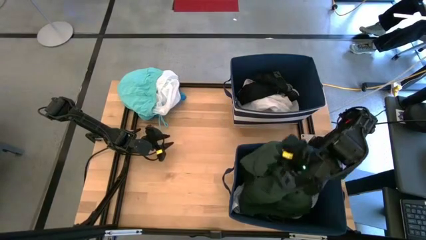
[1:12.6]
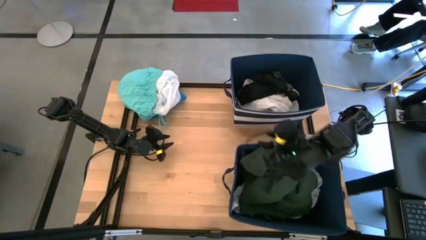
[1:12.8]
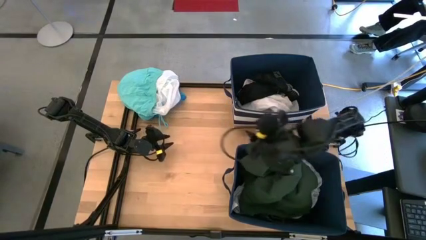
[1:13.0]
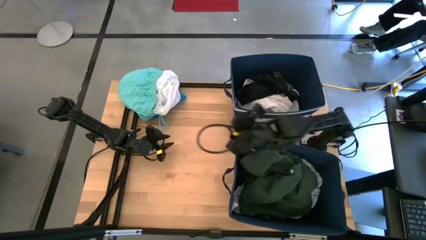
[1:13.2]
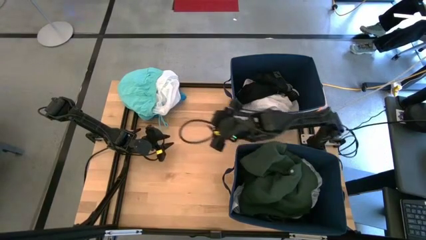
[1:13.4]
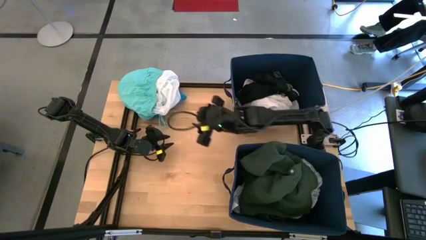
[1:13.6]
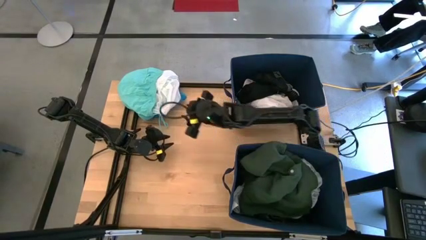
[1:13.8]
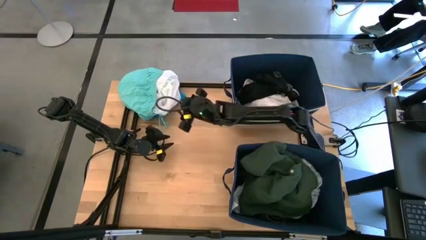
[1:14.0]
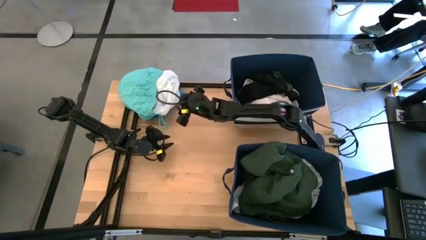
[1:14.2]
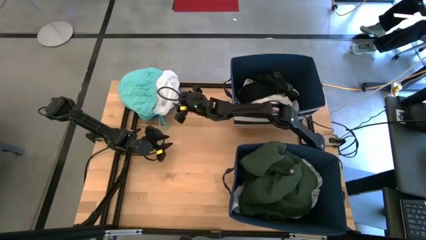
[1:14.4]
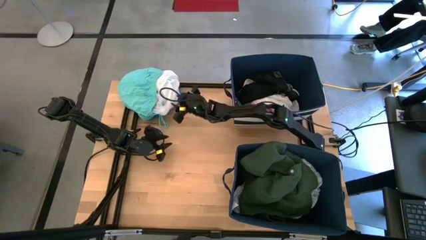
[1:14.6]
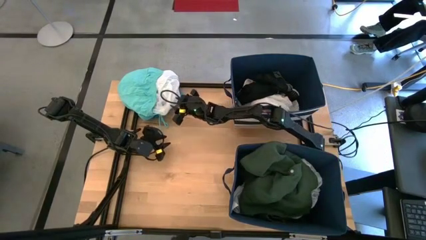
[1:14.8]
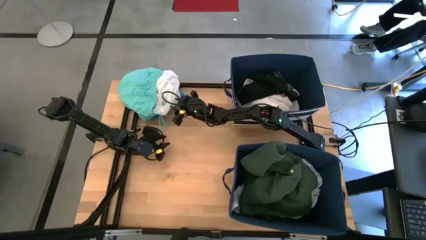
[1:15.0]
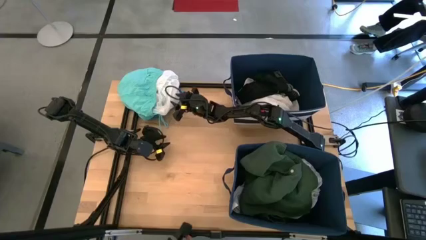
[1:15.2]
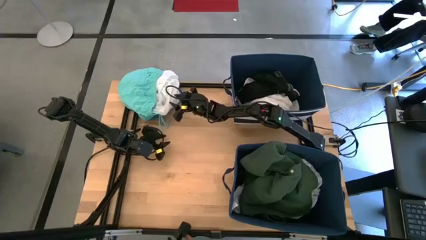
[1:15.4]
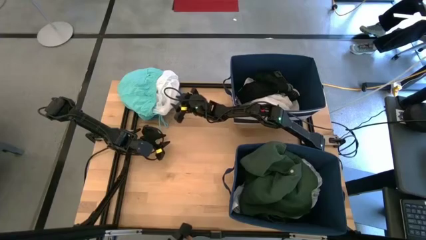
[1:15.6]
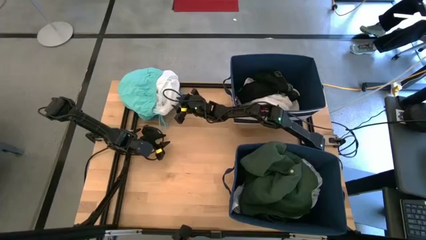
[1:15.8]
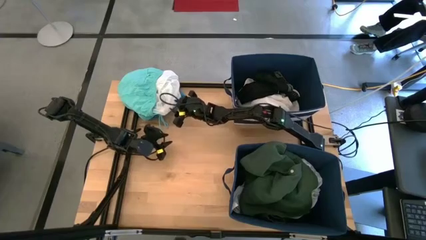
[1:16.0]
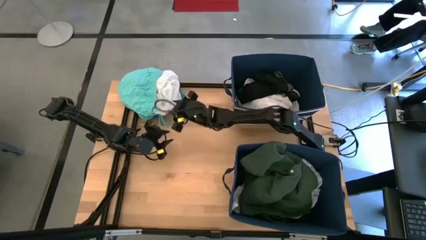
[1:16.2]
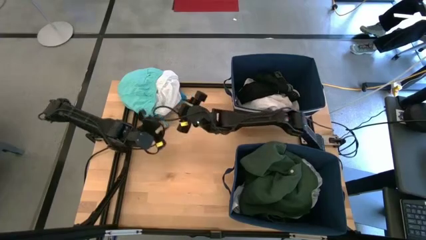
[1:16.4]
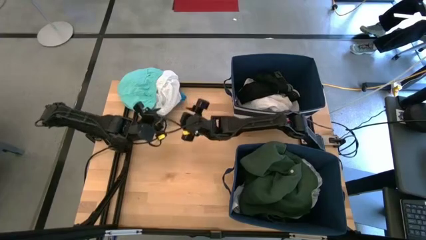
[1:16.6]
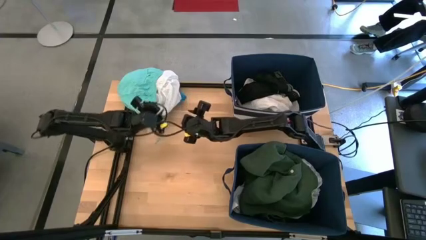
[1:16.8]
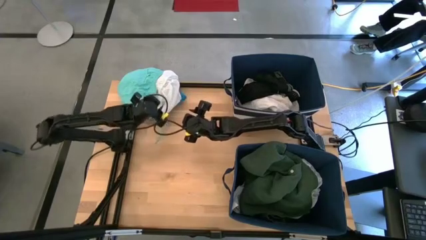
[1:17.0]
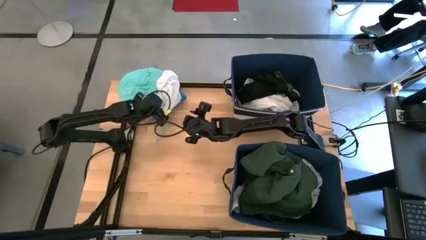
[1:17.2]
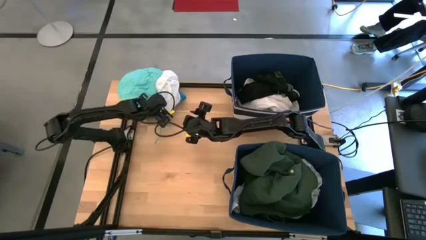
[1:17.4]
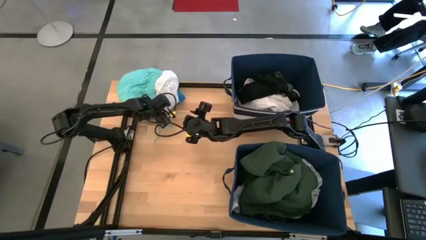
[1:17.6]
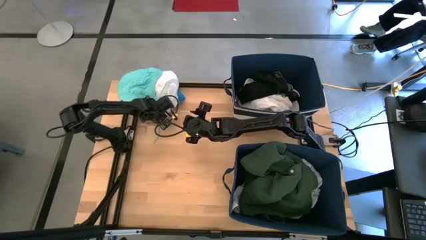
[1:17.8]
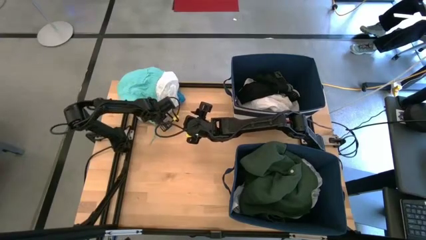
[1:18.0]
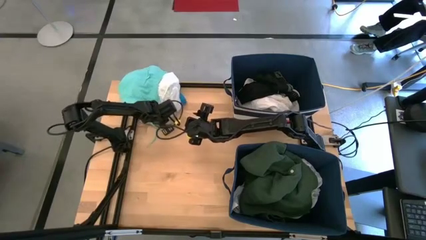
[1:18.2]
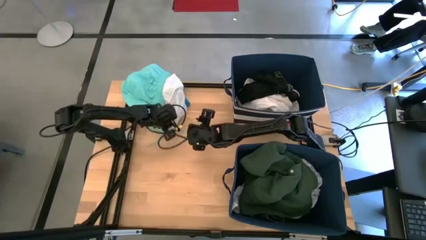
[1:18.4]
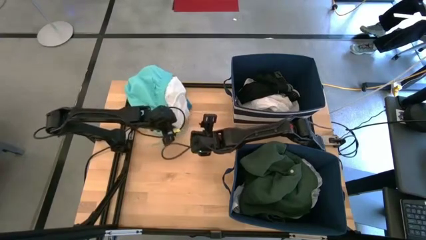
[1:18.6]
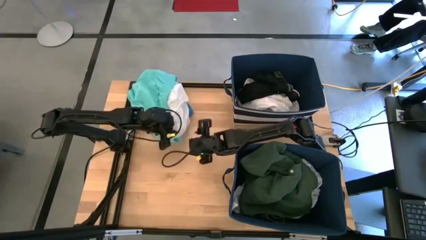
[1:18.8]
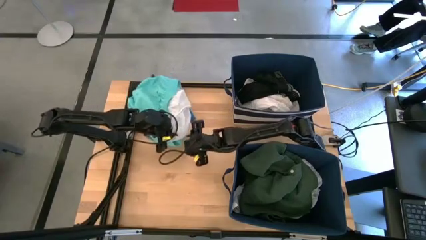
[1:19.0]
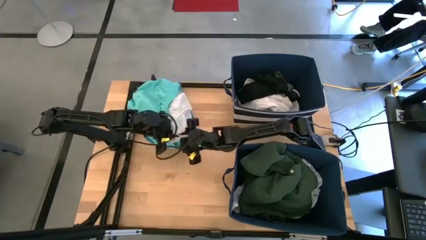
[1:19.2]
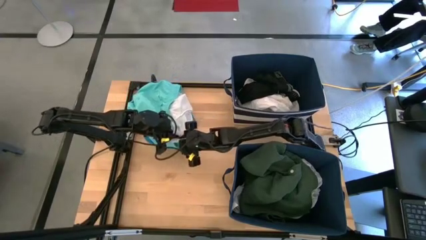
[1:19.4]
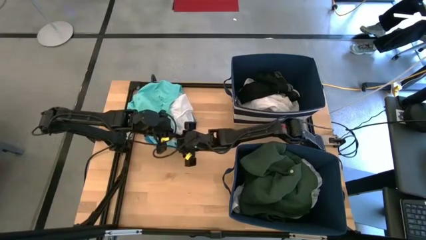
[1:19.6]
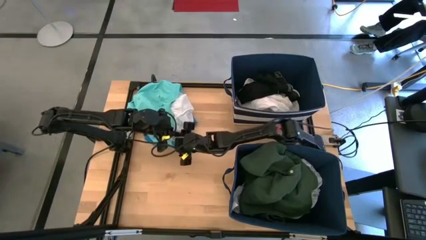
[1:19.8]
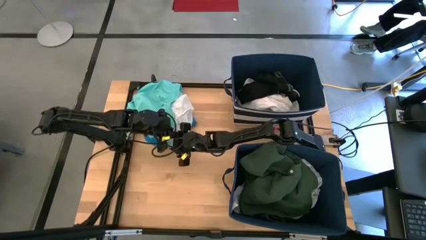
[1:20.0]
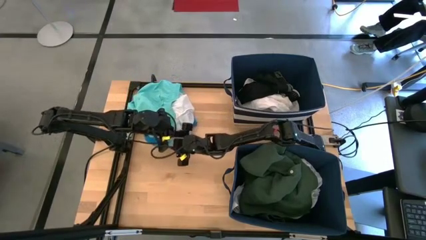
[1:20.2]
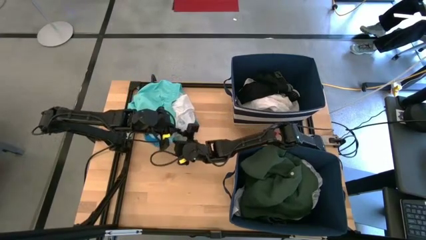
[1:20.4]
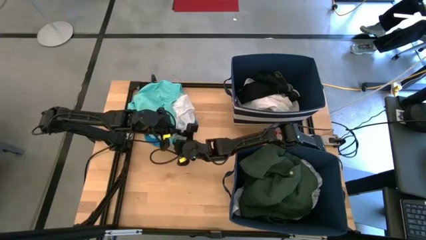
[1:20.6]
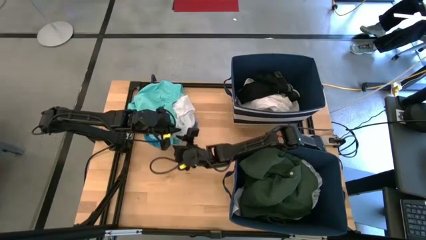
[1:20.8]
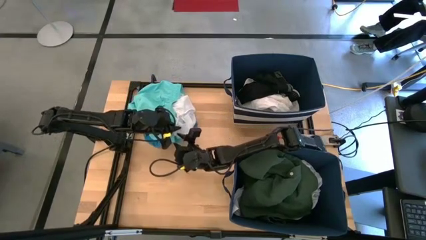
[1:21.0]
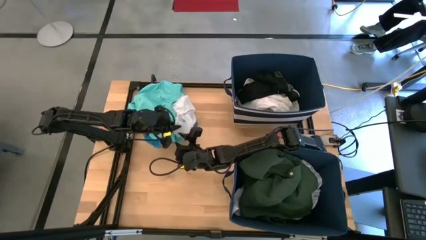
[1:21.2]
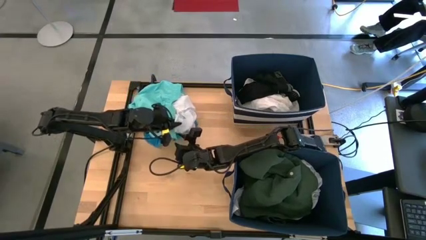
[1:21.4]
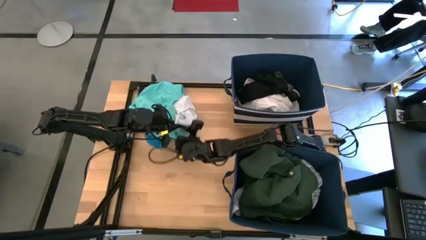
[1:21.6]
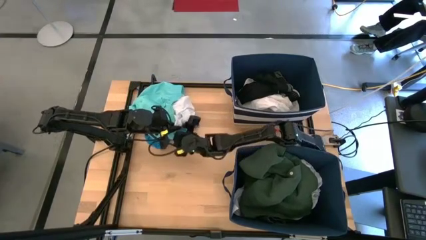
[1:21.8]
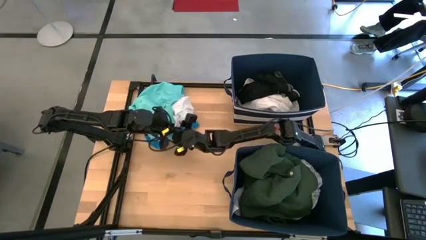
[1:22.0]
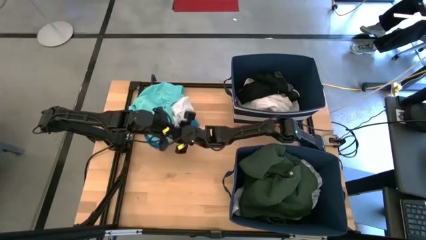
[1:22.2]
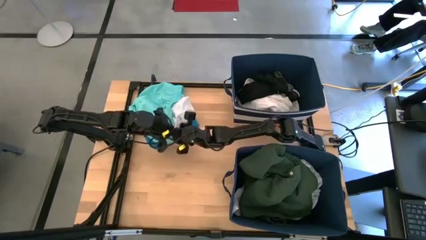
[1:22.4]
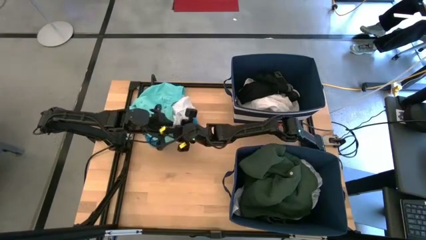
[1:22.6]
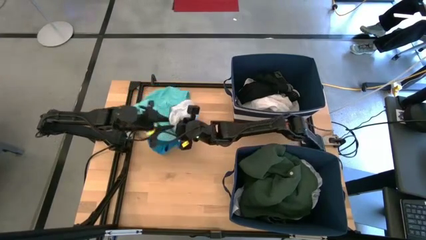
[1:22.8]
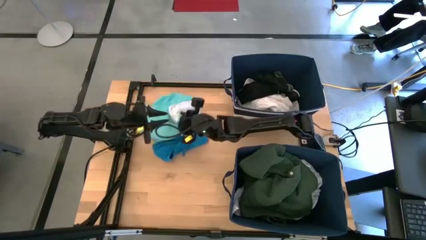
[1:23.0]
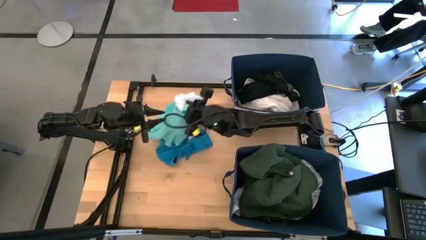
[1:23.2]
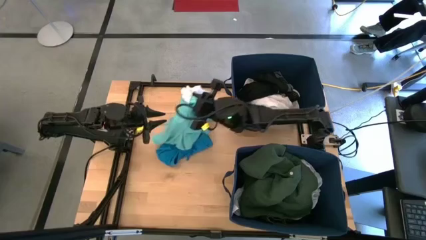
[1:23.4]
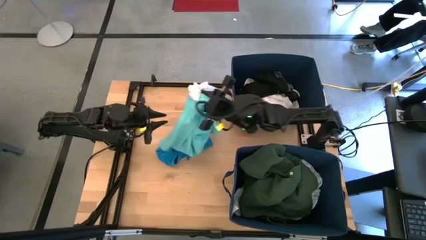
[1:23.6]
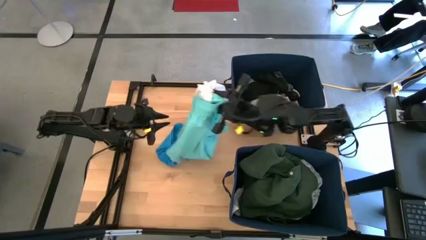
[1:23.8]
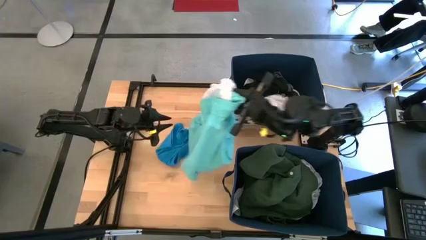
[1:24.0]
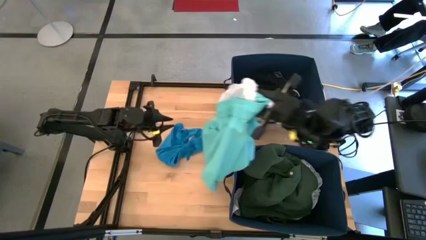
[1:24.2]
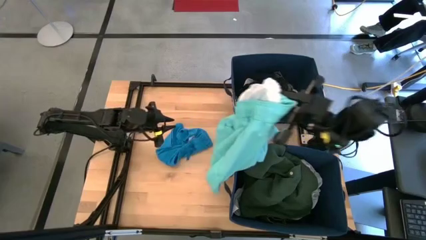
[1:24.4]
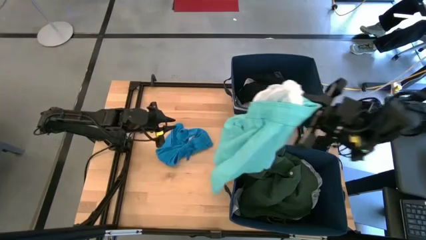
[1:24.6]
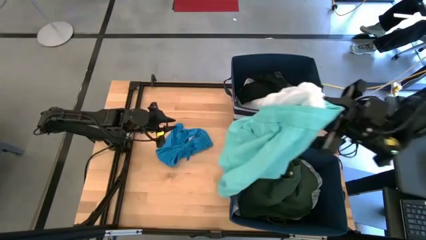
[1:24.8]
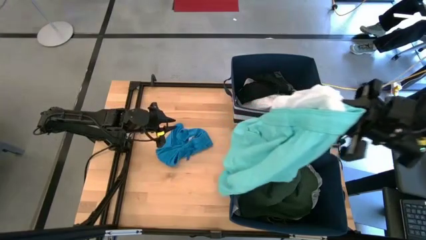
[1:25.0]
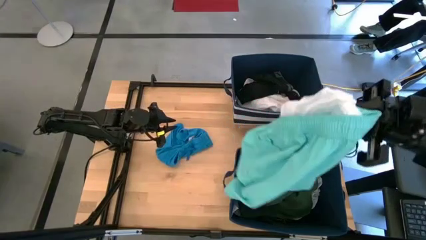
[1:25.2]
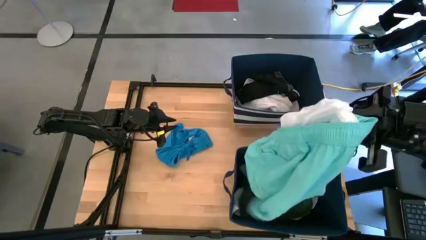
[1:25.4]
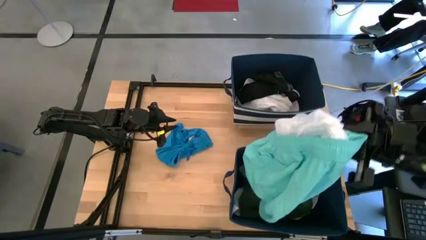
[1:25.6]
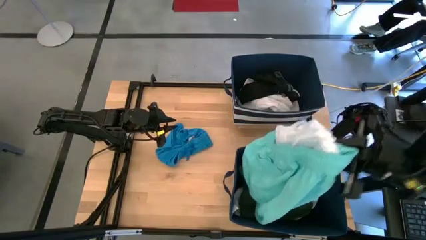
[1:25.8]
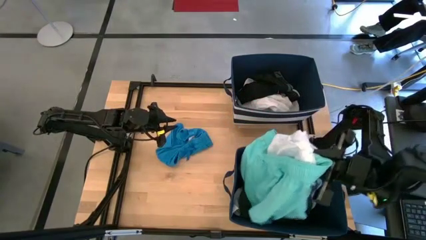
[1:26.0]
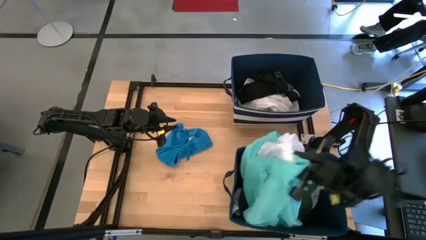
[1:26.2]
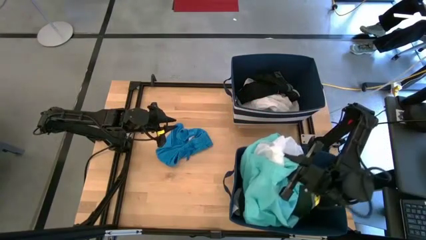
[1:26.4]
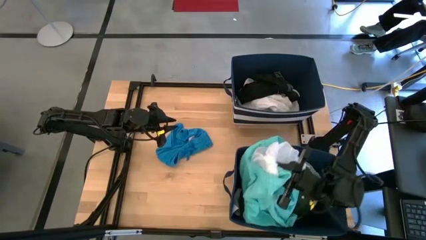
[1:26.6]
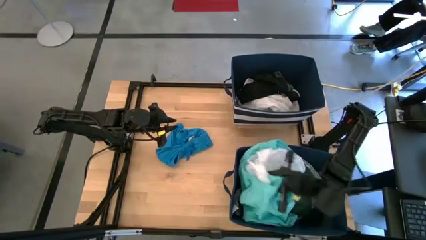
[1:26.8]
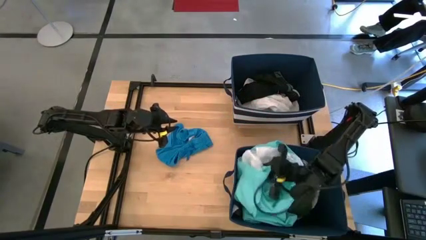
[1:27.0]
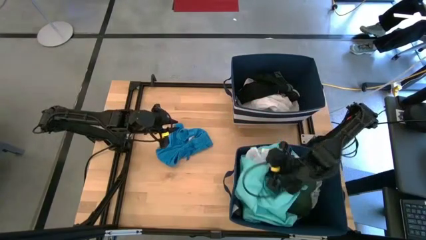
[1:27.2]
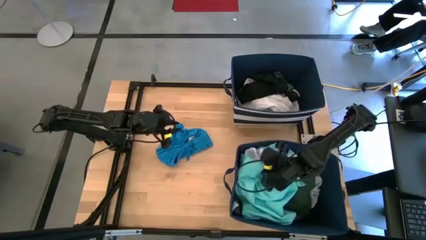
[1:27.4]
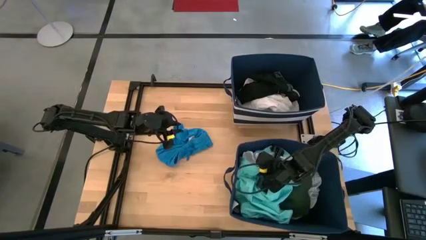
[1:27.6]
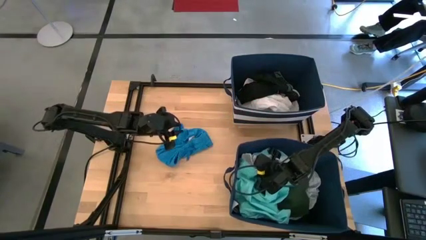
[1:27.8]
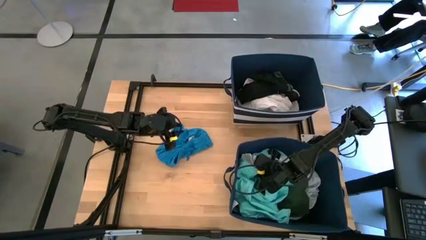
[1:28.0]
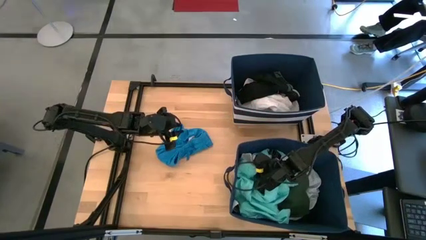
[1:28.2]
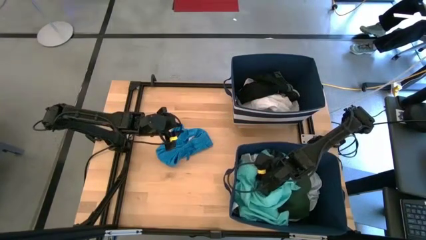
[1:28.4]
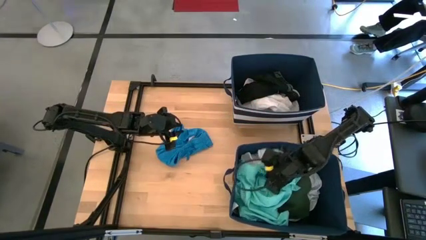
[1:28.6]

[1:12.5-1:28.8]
Task: Sort clothes
Put the light blue shorts into the bottom blue laundry organizer
